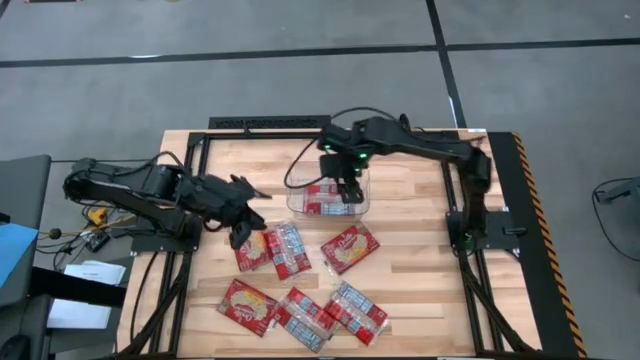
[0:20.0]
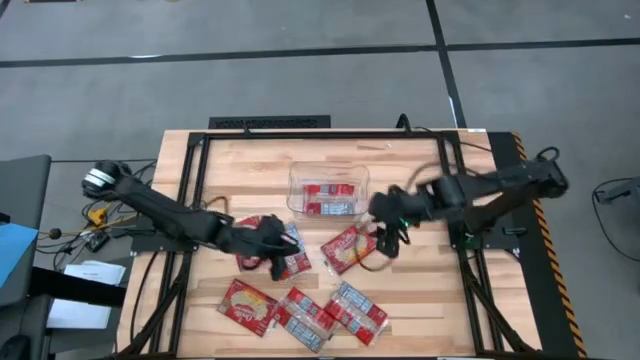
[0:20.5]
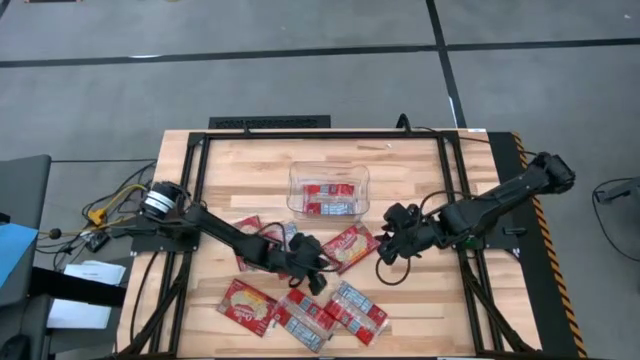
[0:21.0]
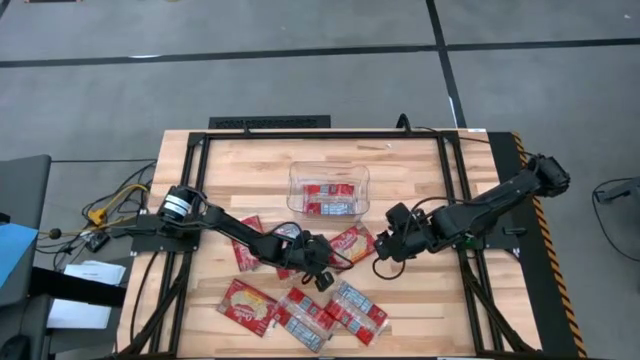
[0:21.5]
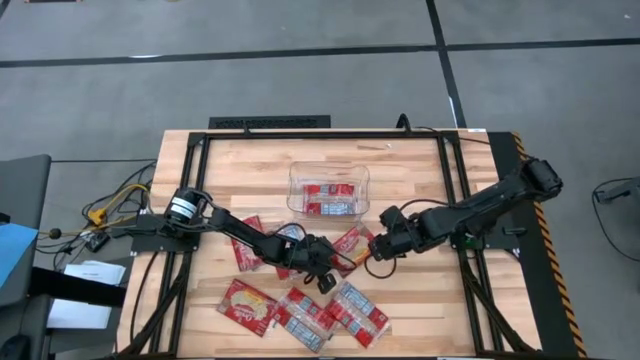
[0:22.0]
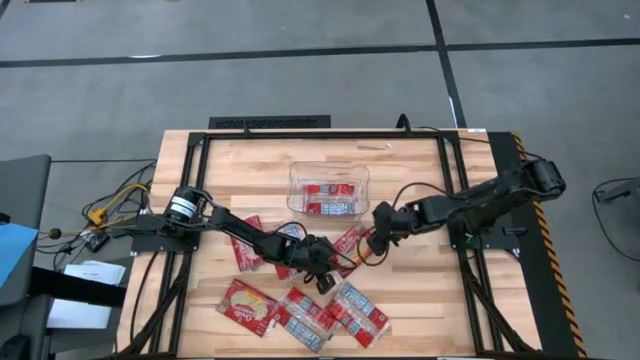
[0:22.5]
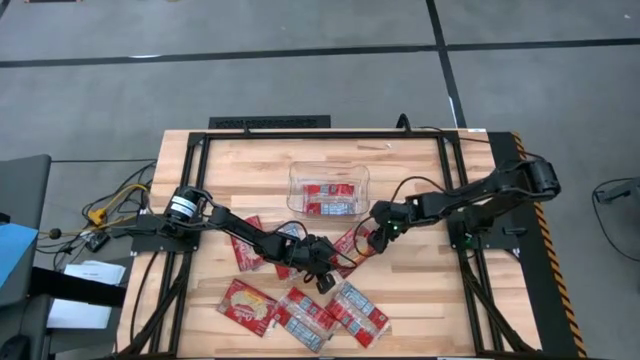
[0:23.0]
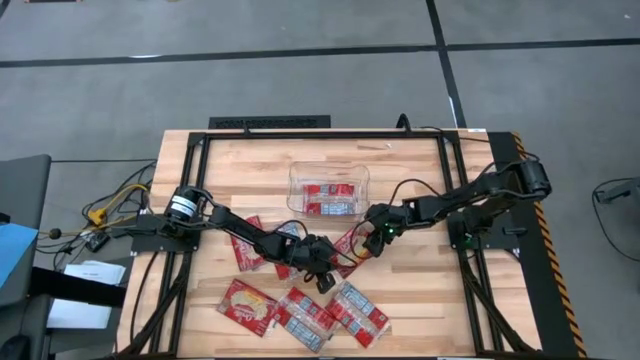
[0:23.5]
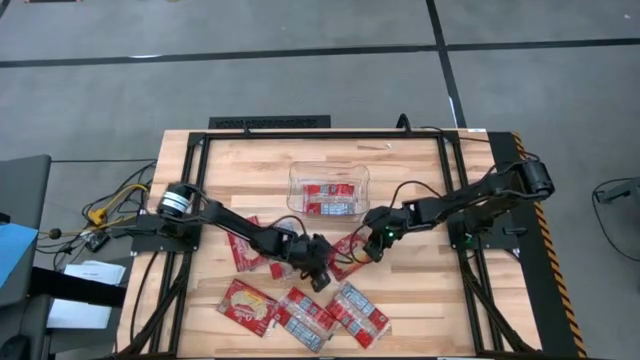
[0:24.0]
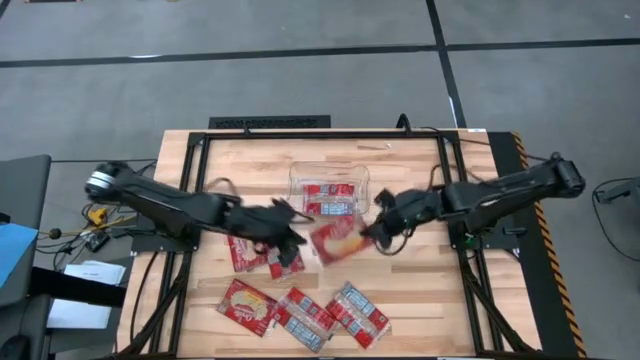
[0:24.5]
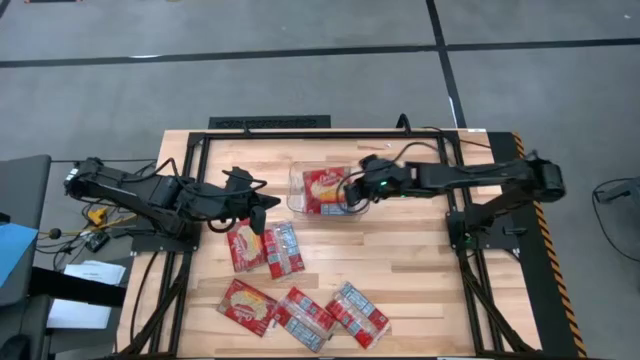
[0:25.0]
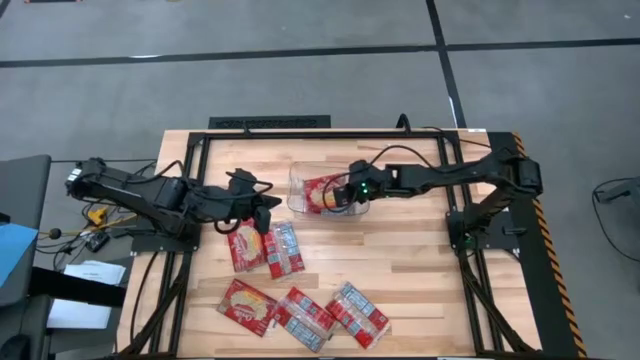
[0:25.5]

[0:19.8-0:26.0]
Task: Sort popcorn bags into baskets
Put the red popcorn bag into the transparent bin

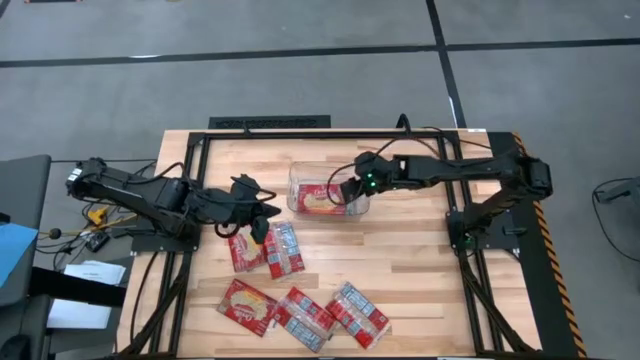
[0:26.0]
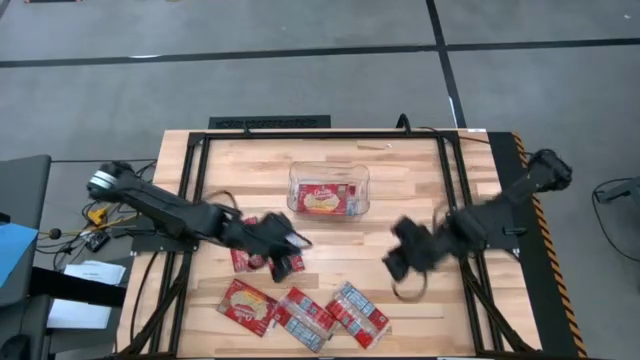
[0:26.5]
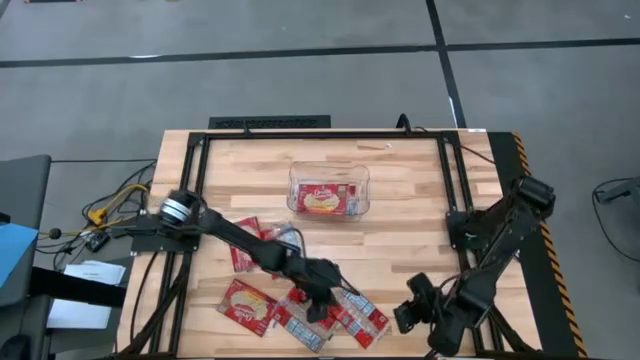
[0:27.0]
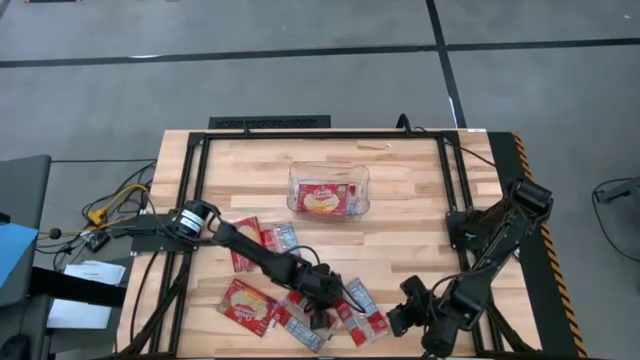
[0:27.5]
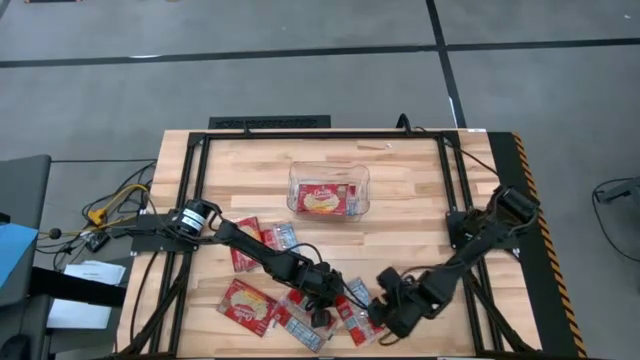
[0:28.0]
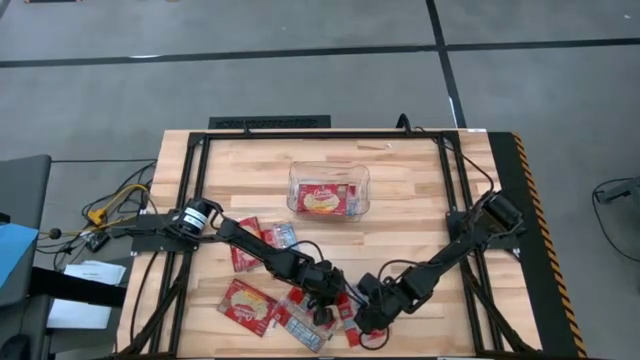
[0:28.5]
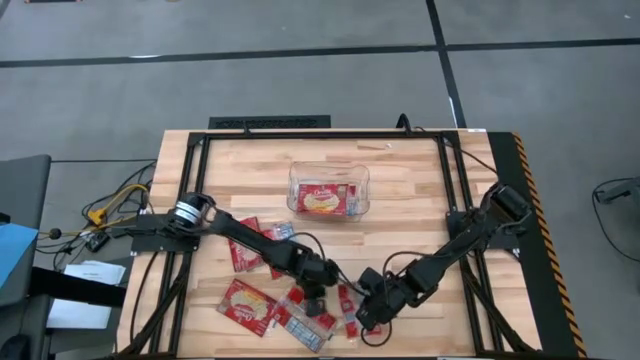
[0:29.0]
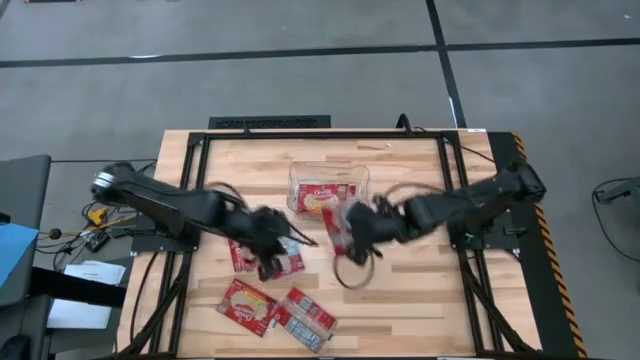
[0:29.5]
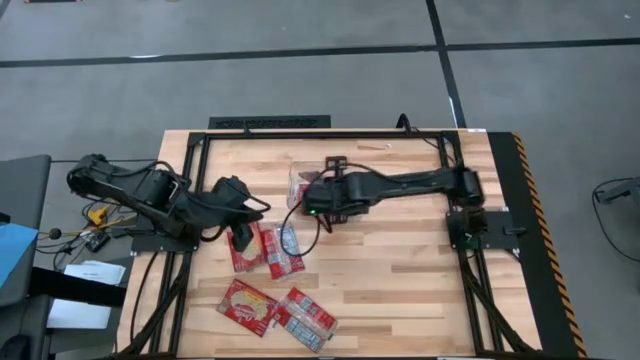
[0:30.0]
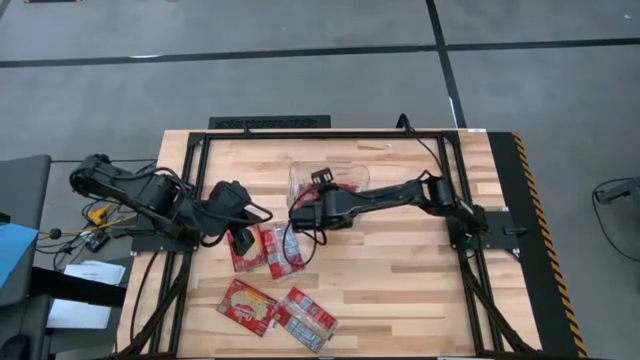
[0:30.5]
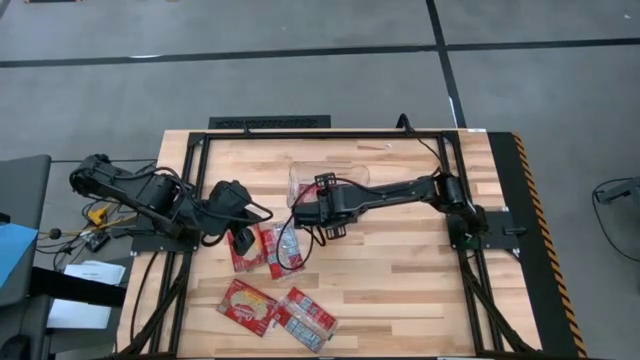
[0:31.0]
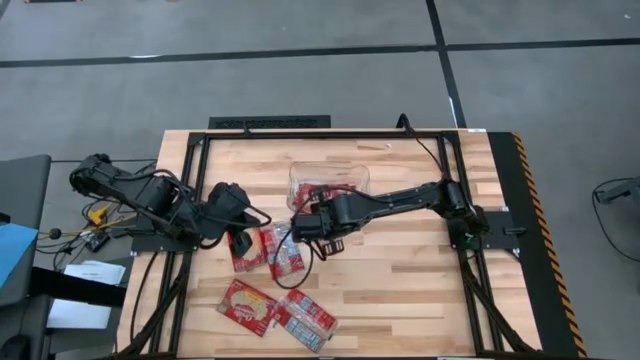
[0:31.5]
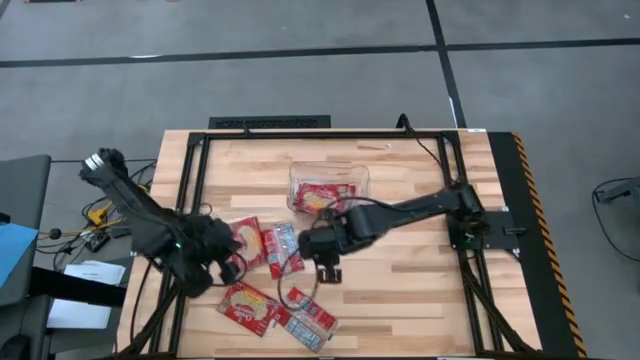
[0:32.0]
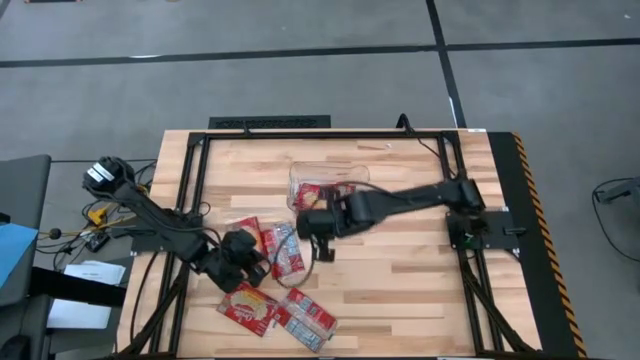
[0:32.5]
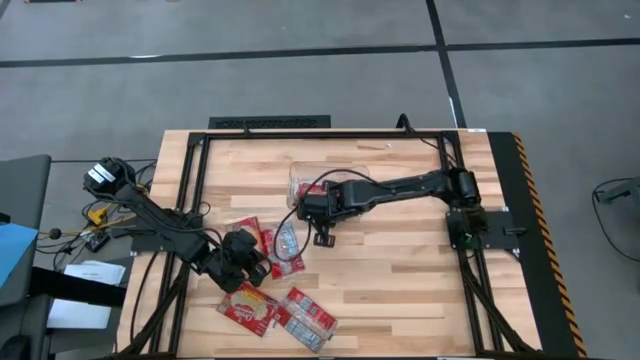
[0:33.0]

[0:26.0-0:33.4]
Put the red popcorn bag into the transparent bin

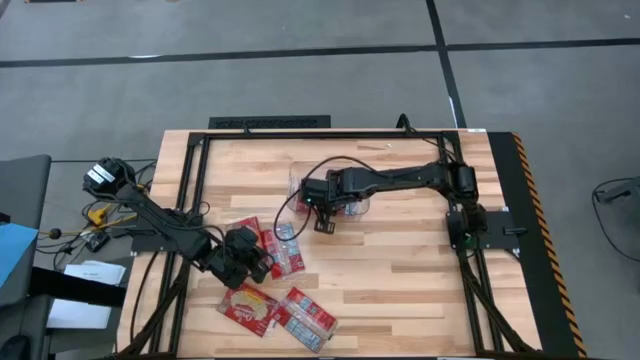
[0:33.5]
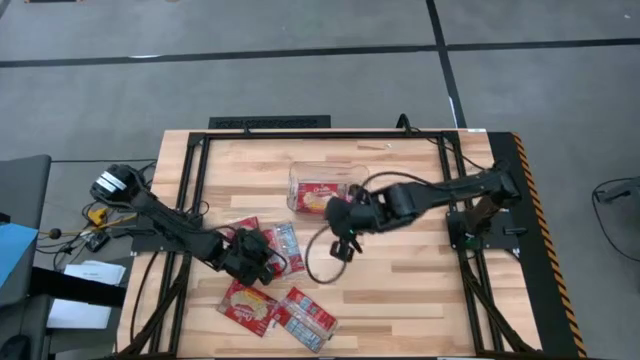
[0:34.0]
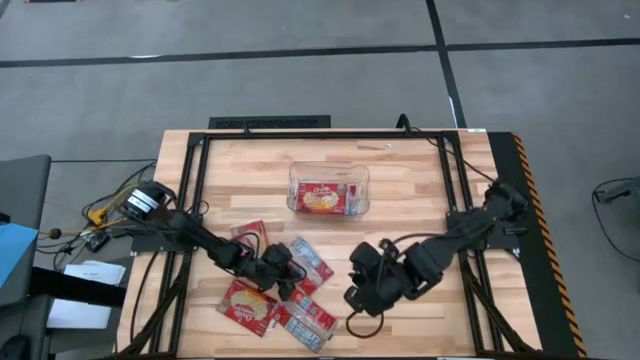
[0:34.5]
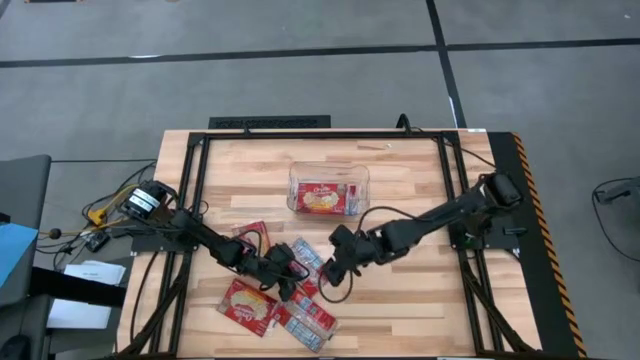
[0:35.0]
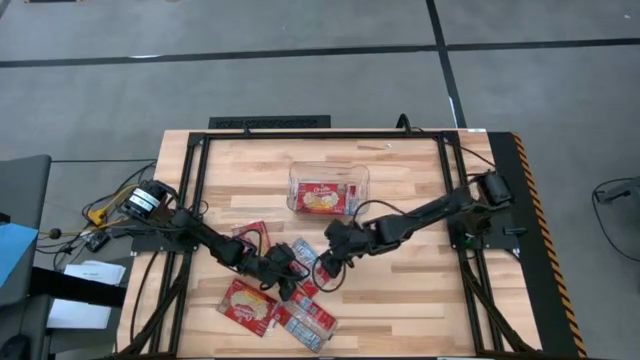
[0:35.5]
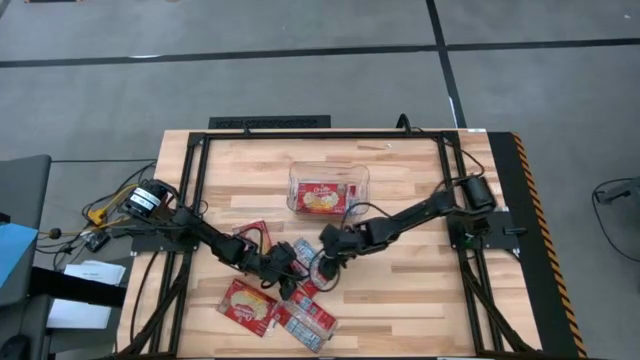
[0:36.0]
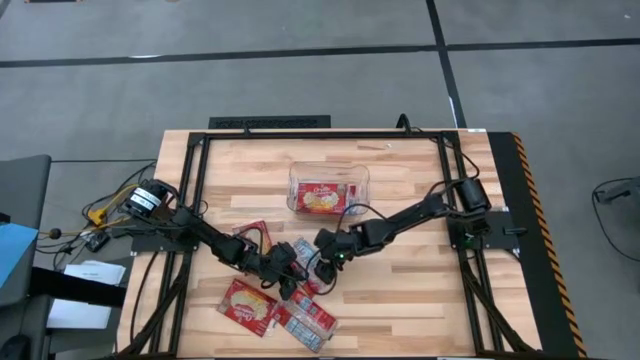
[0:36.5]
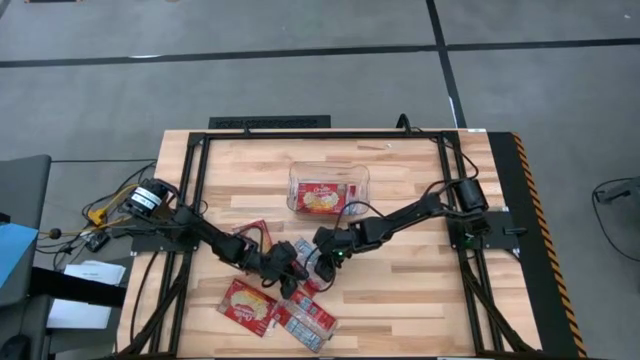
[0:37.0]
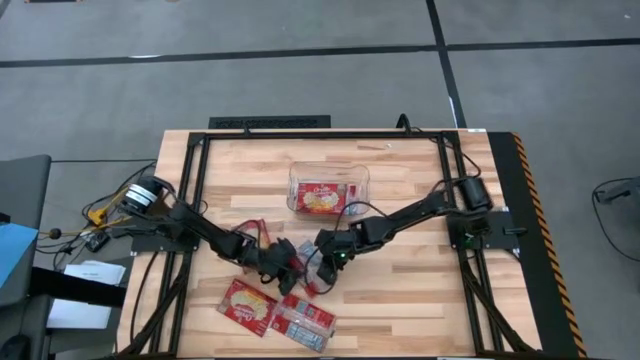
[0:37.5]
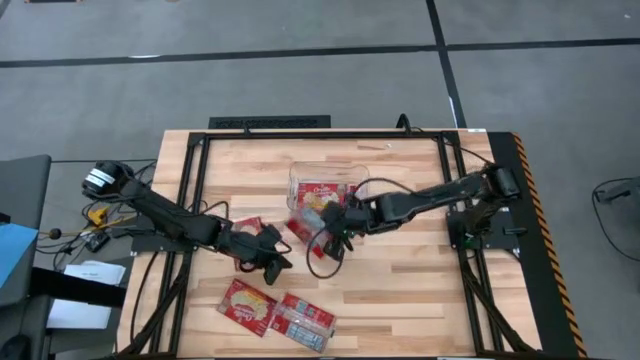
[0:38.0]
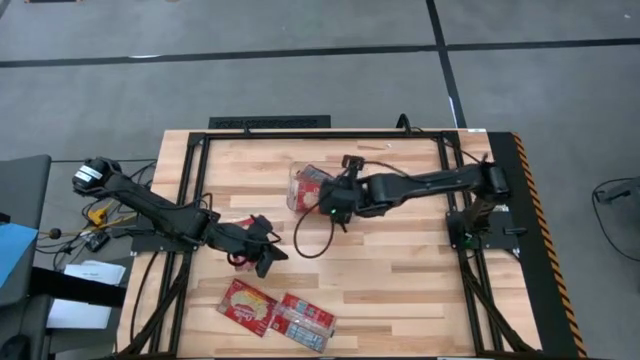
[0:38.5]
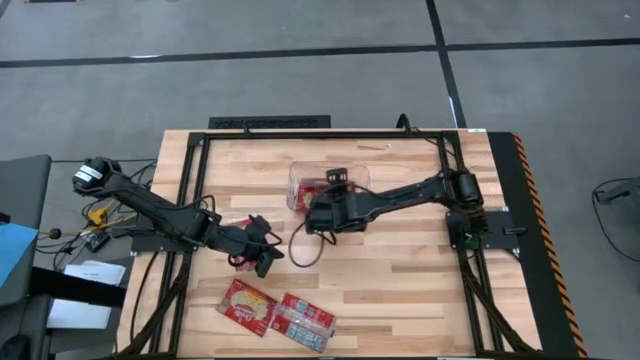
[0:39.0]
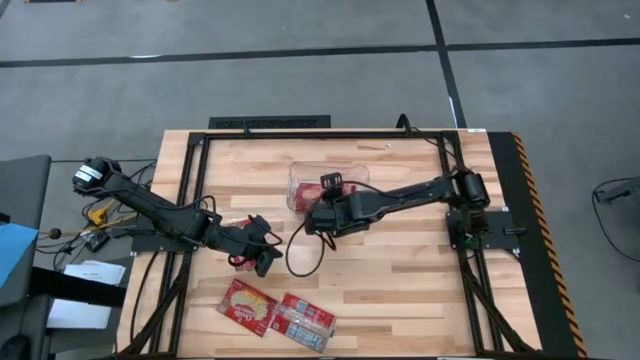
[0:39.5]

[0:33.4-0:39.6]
Put the red popcorn bag into the transparent bin
